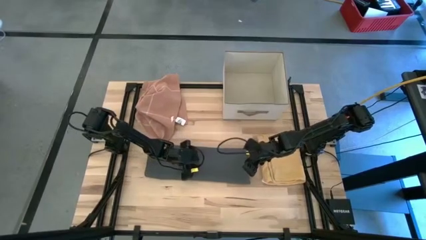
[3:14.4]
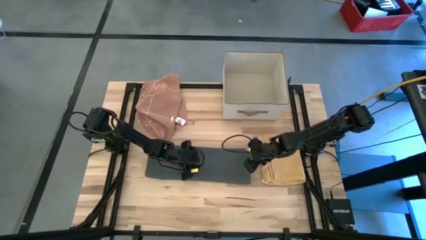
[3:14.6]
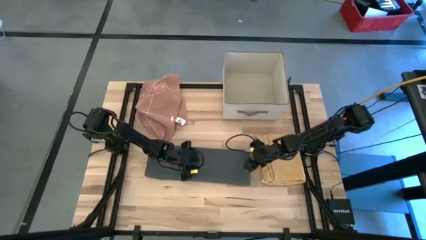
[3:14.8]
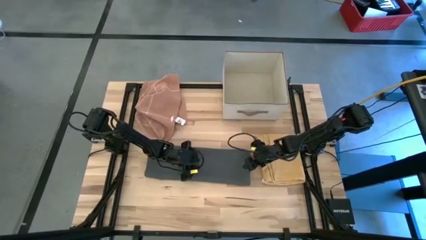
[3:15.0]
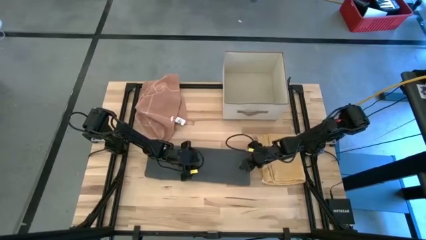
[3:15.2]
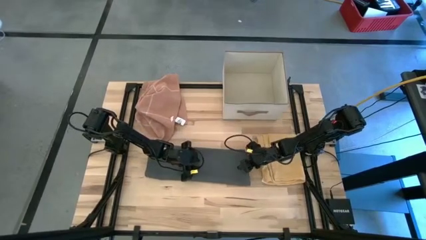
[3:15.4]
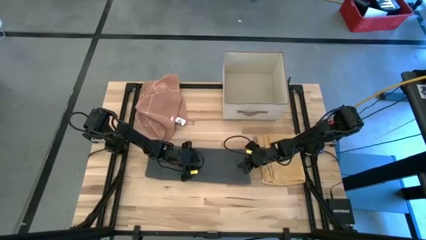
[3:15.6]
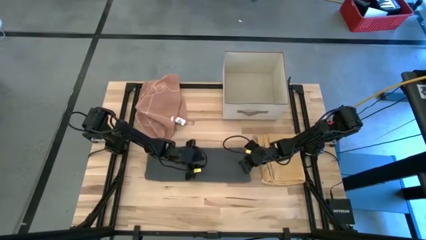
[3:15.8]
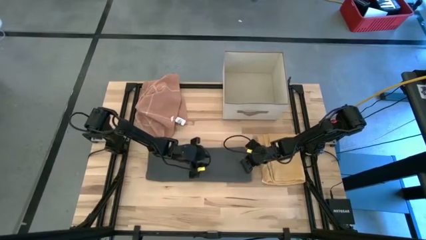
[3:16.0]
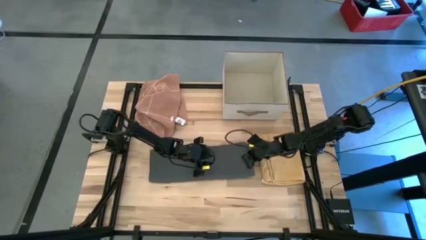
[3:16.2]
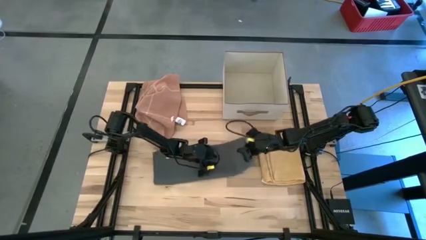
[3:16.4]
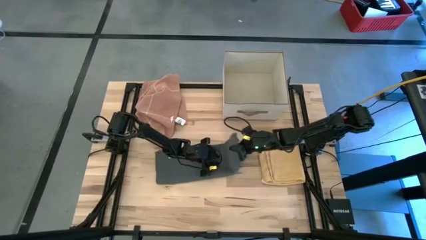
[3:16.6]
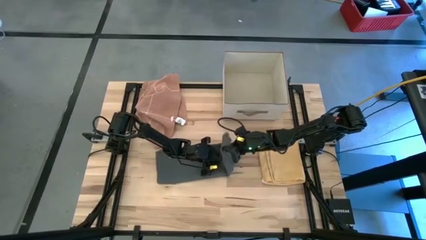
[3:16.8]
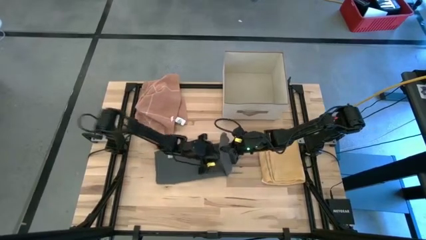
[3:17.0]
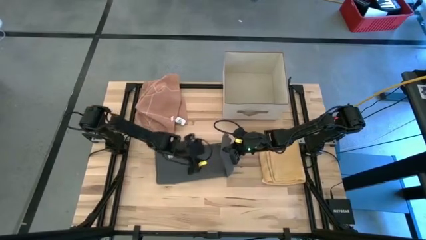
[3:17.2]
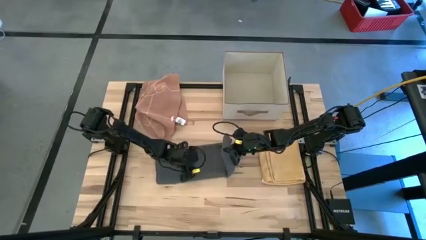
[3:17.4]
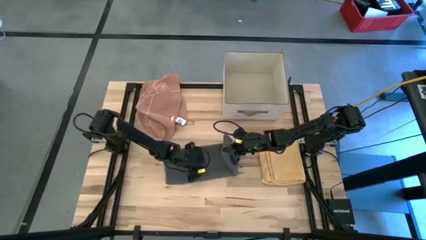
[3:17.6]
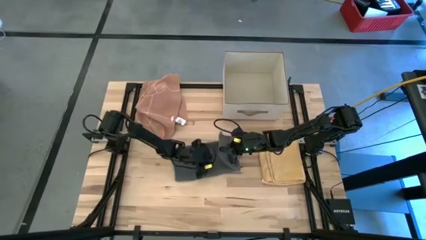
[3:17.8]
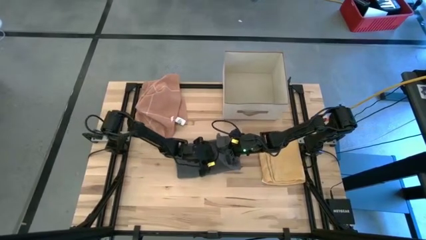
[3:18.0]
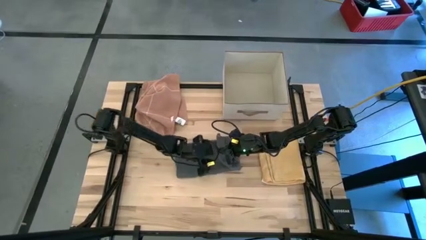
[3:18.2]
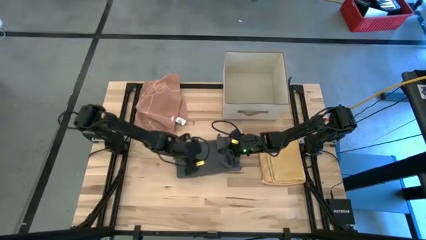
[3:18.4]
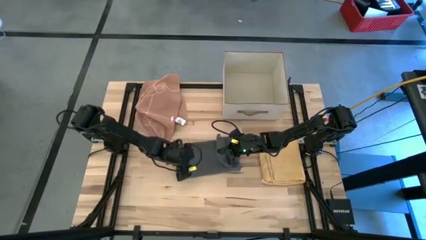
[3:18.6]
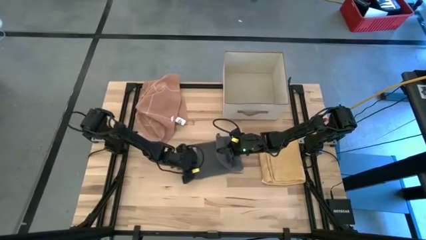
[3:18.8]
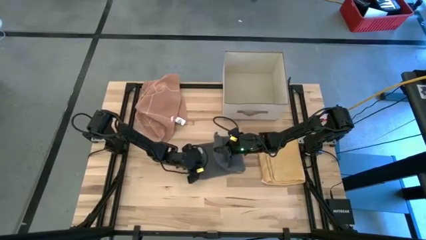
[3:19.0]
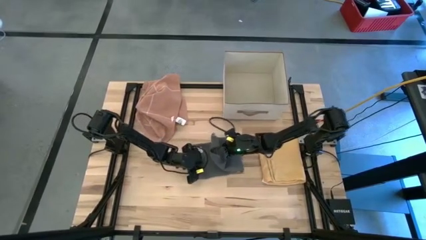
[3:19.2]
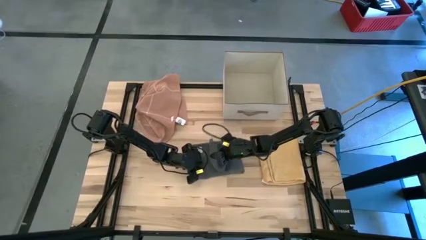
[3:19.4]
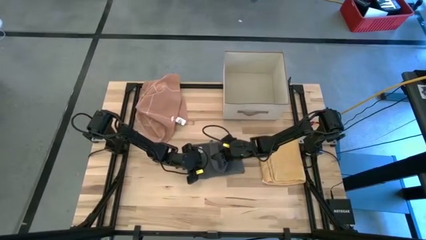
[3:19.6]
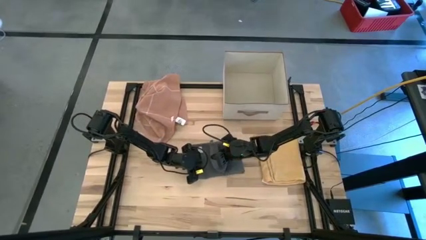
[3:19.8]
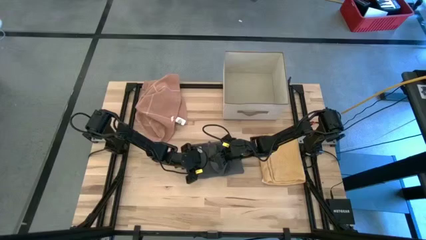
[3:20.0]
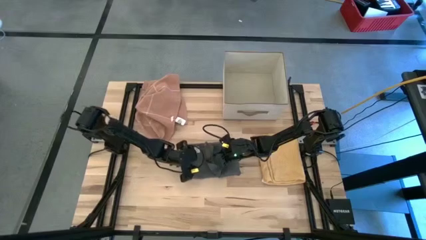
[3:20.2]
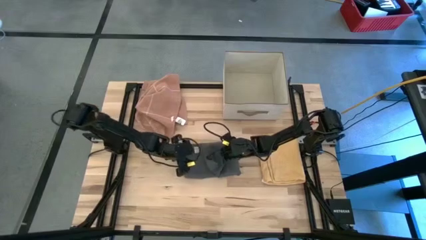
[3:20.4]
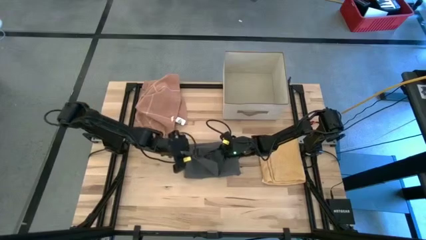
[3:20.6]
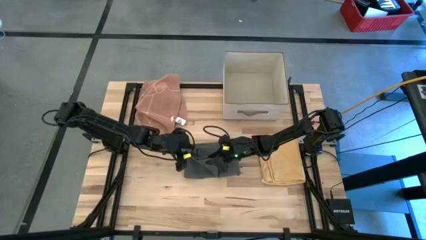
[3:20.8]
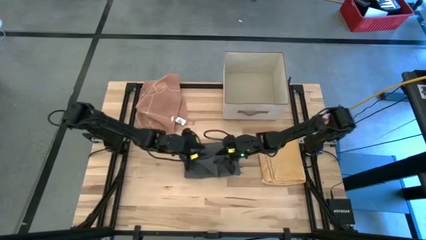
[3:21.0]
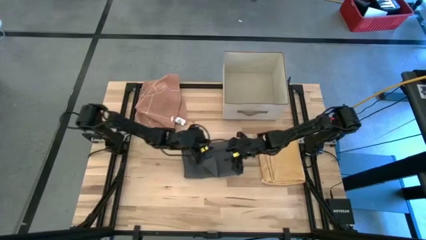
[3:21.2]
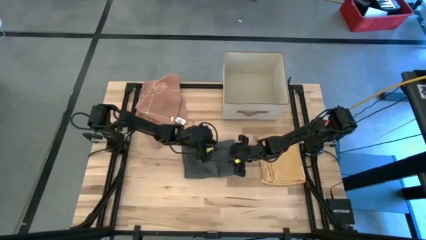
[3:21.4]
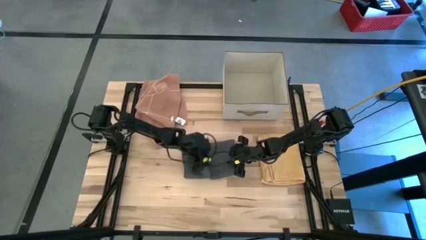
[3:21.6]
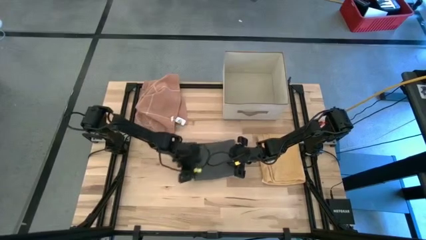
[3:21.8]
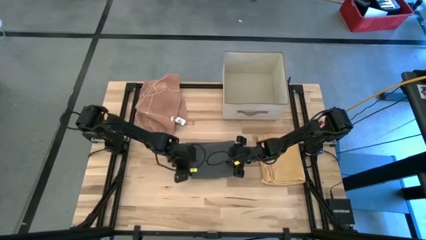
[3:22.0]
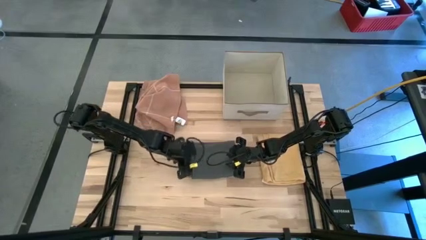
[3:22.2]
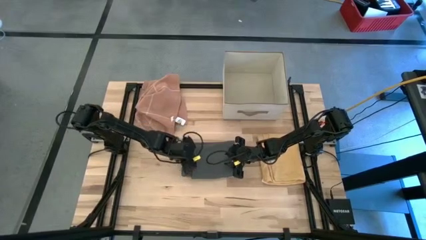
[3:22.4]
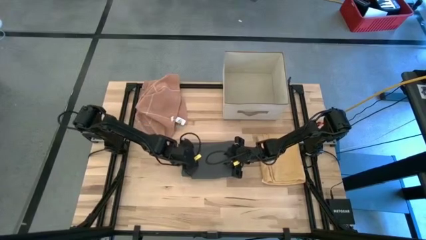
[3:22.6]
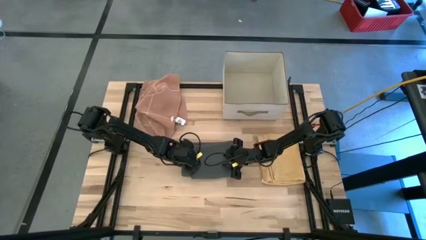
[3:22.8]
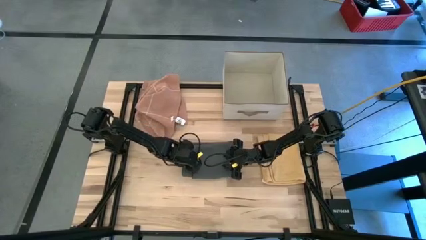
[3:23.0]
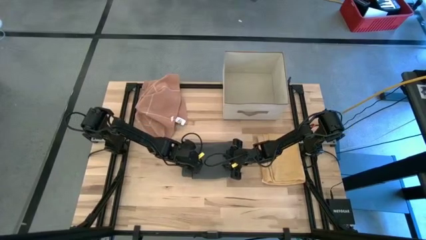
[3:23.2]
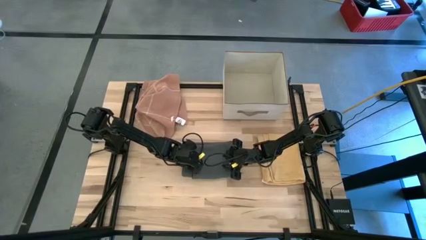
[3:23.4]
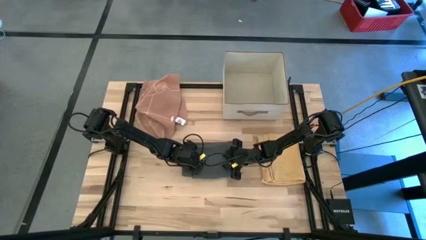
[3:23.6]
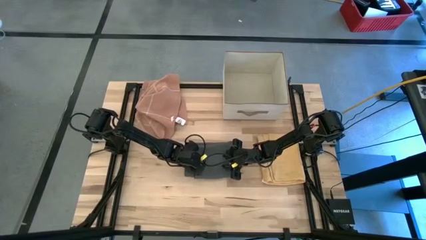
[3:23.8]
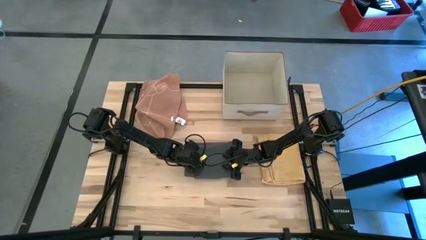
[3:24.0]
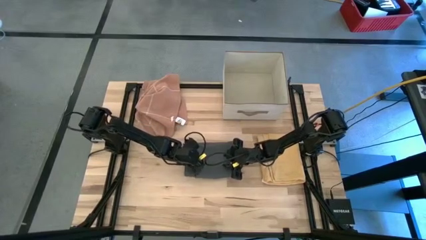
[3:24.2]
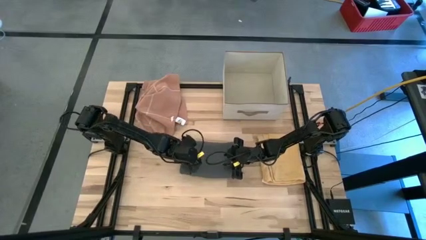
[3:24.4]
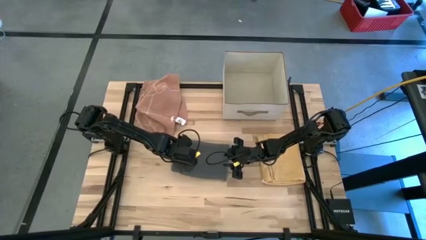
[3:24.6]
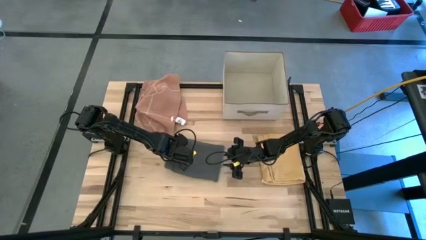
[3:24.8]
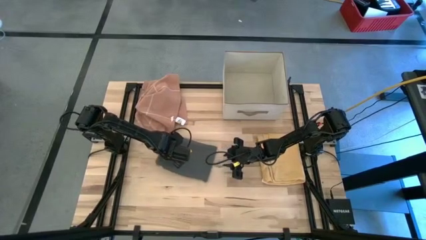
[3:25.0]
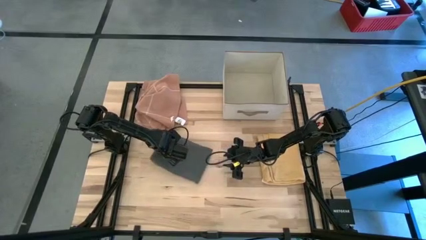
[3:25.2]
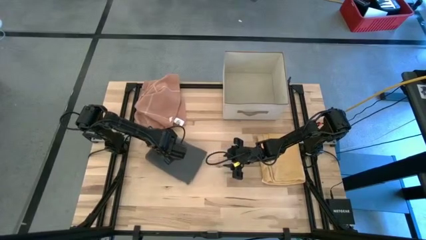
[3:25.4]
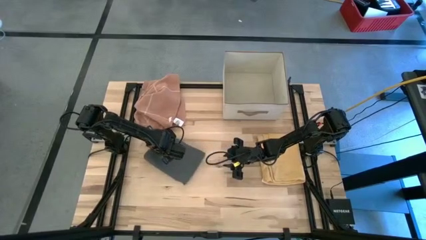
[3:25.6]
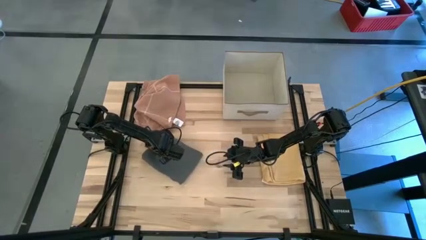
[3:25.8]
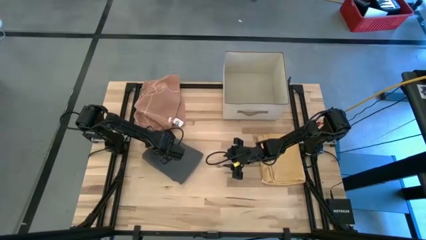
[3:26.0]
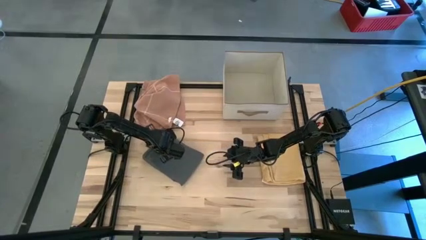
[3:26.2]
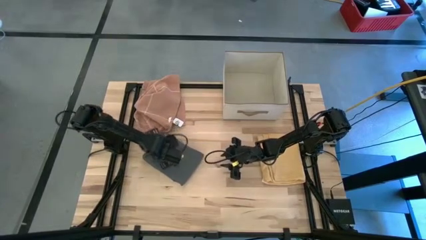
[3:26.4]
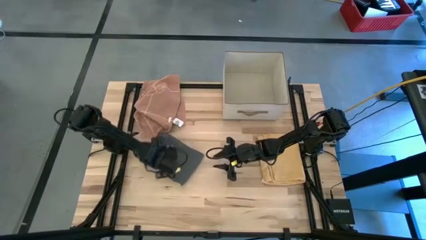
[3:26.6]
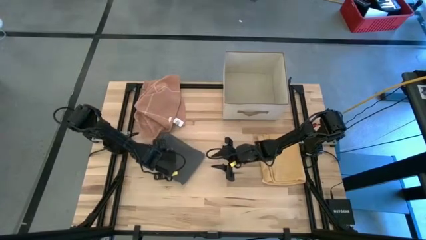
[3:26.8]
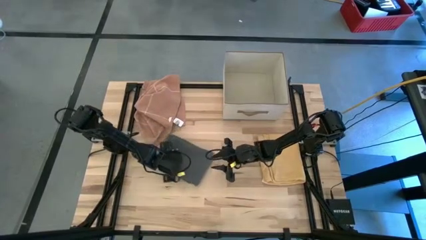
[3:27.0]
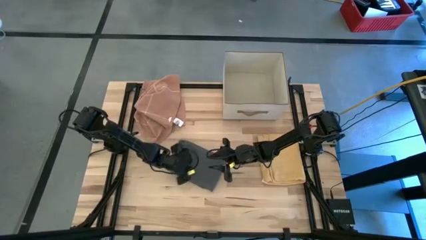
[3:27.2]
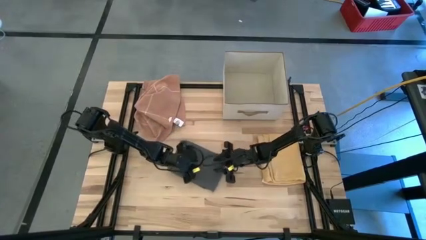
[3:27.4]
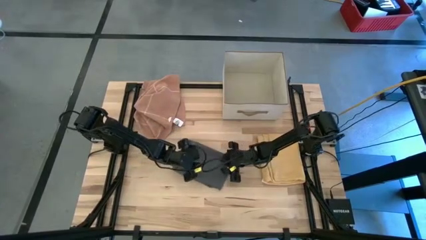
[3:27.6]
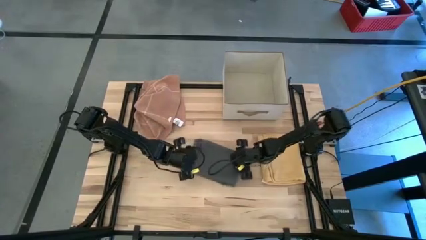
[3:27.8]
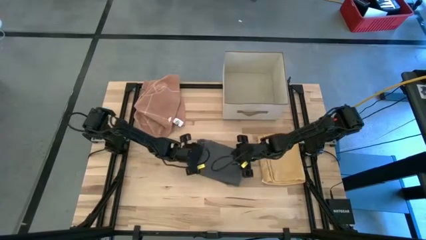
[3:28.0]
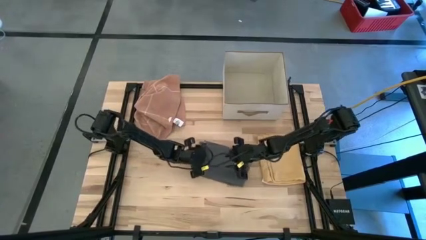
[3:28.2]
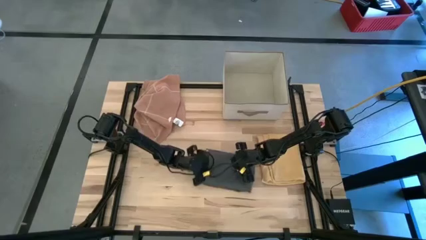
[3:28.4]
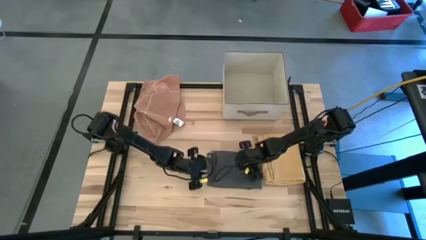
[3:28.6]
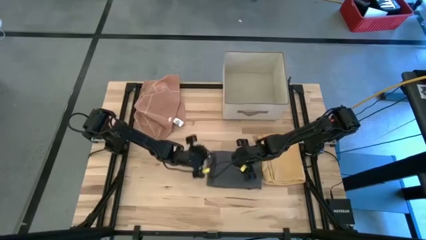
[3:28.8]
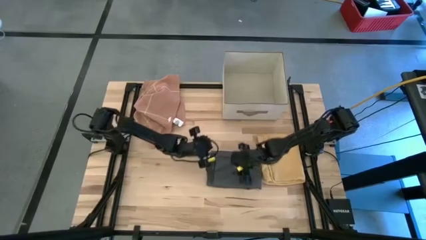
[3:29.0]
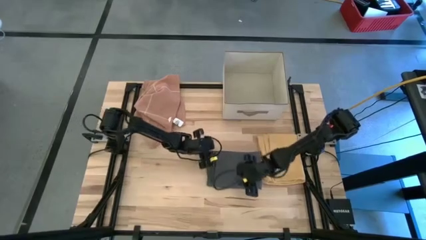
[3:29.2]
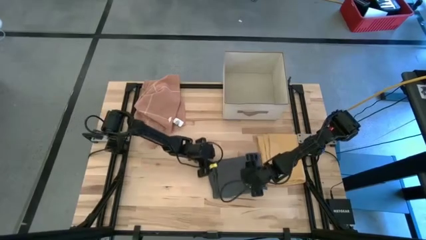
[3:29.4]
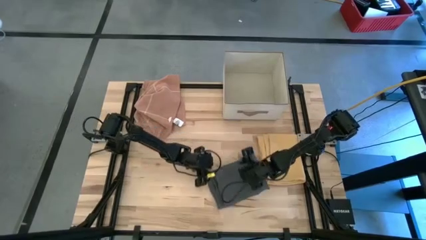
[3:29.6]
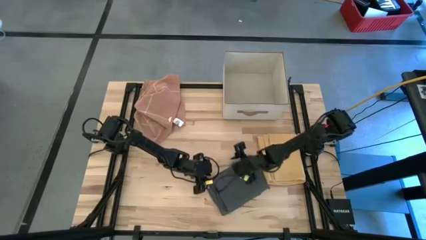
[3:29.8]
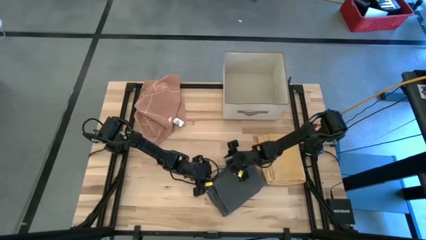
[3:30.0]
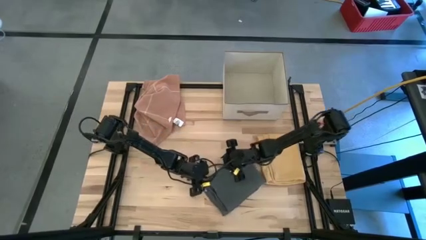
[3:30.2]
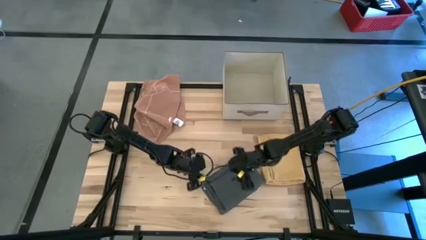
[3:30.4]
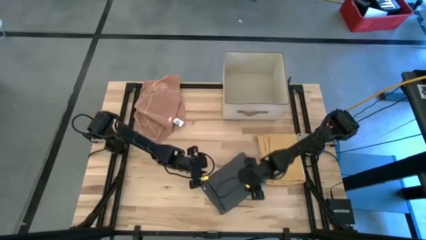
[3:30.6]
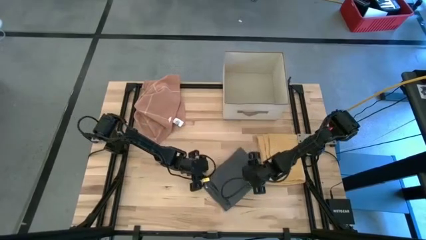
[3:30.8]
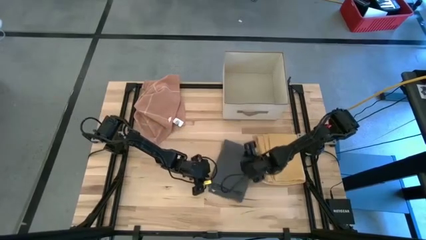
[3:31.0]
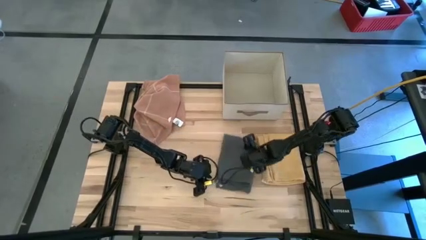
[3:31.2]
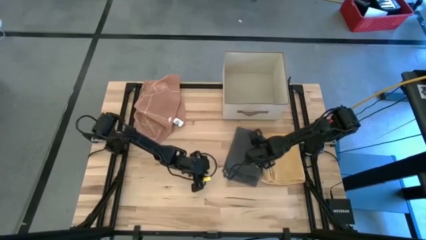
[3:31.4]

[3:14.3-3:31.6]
Task: Fold towel
Fold the gray towel
